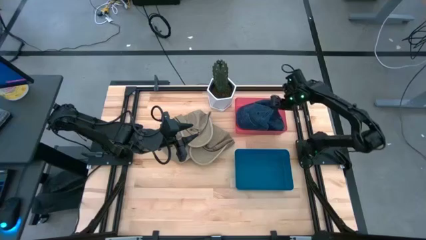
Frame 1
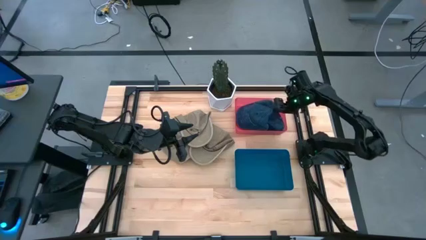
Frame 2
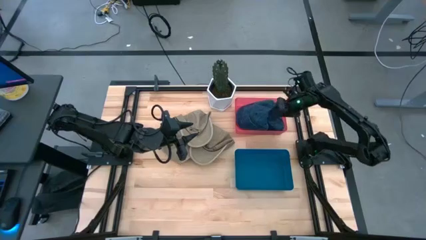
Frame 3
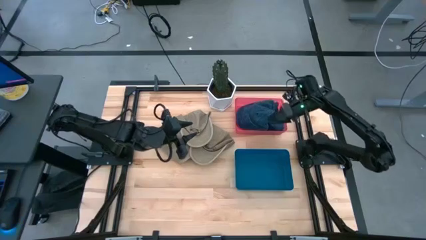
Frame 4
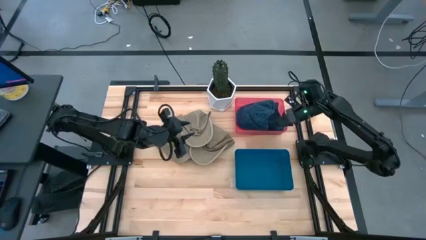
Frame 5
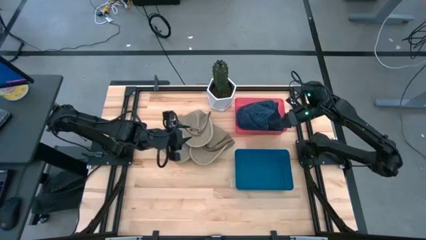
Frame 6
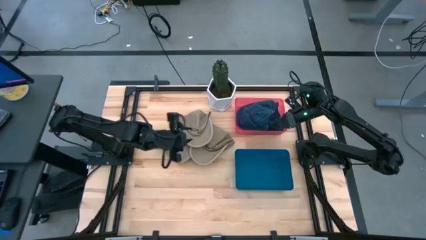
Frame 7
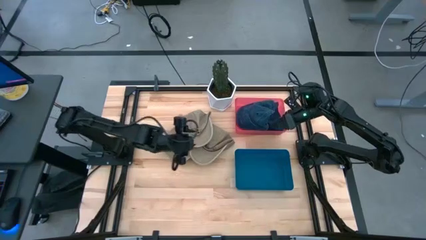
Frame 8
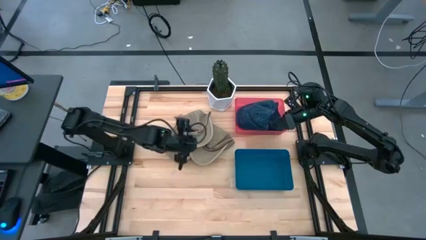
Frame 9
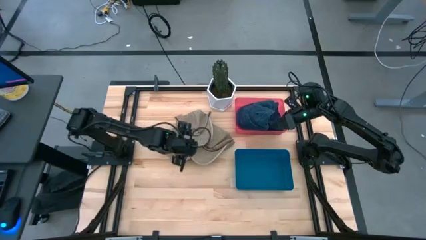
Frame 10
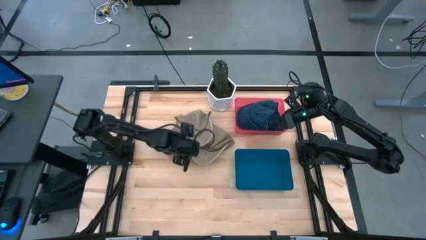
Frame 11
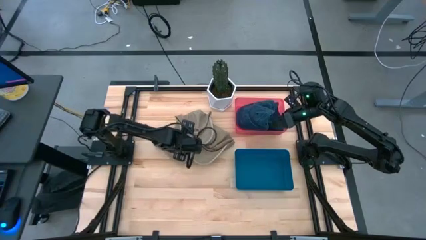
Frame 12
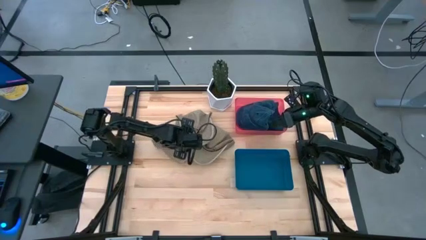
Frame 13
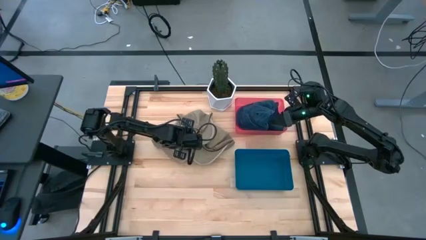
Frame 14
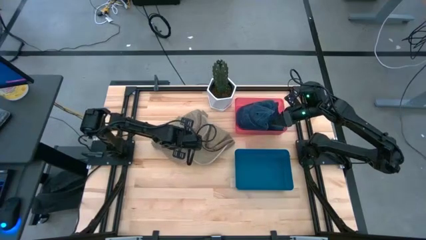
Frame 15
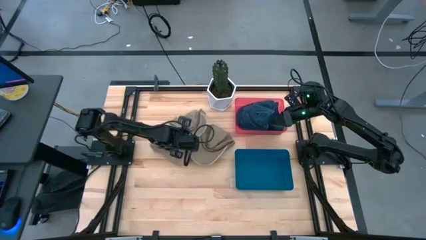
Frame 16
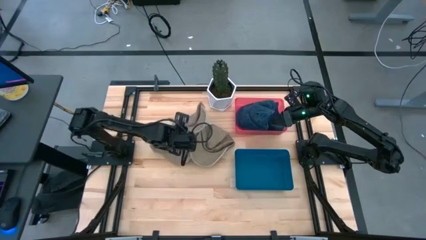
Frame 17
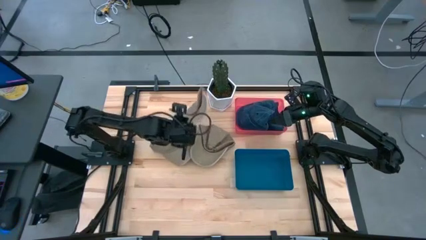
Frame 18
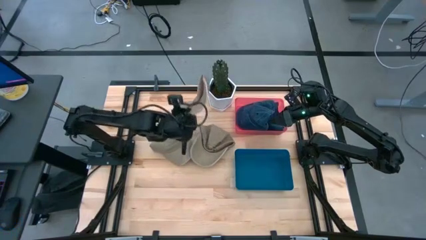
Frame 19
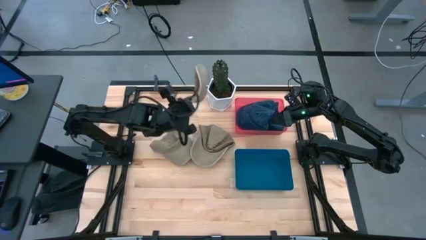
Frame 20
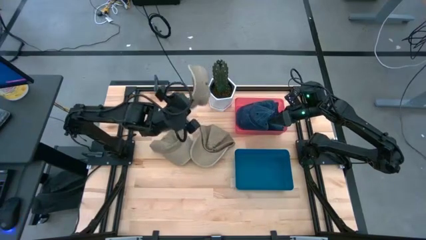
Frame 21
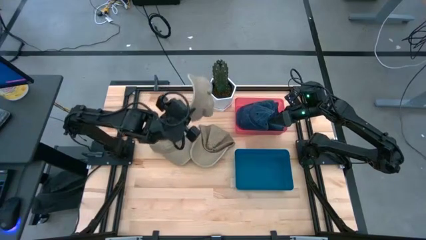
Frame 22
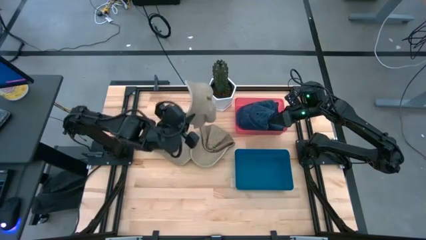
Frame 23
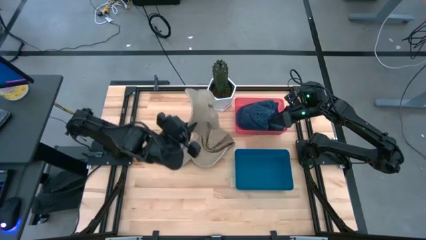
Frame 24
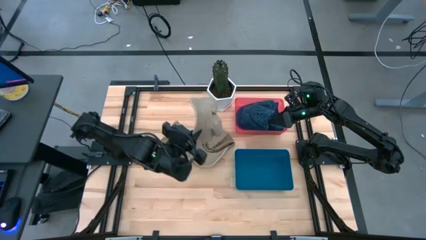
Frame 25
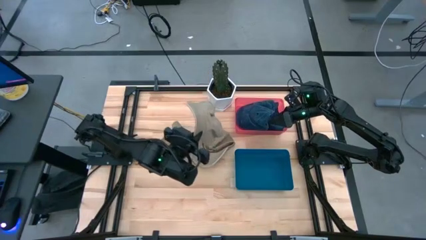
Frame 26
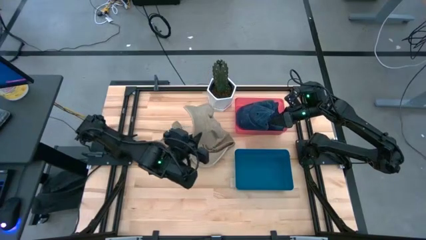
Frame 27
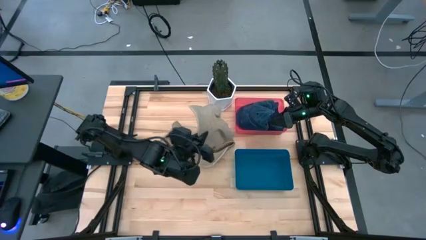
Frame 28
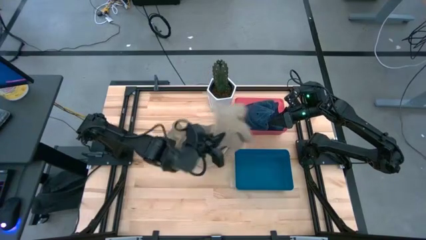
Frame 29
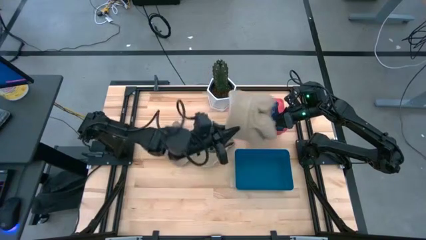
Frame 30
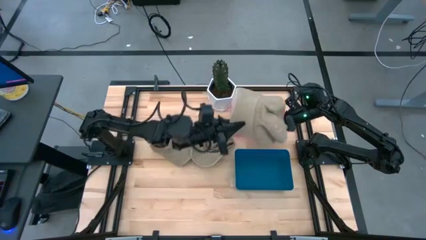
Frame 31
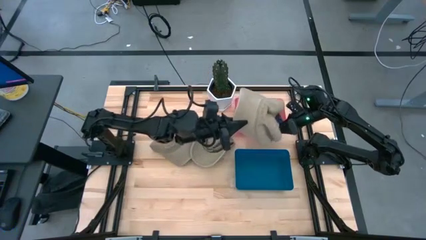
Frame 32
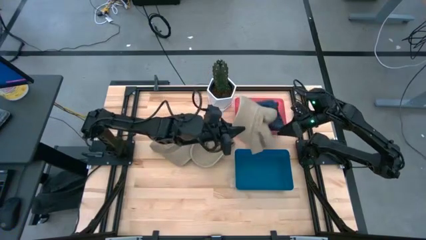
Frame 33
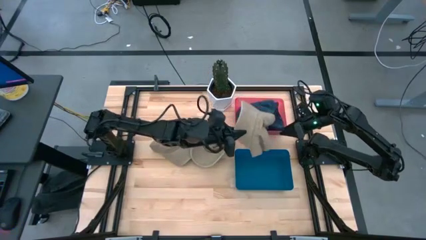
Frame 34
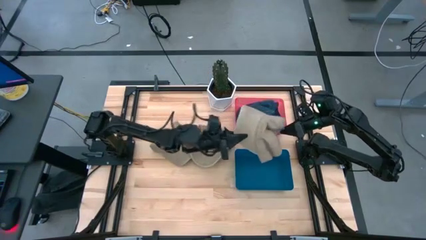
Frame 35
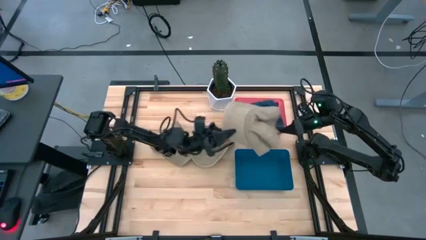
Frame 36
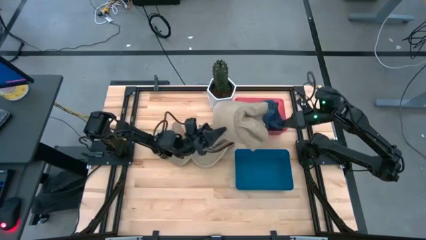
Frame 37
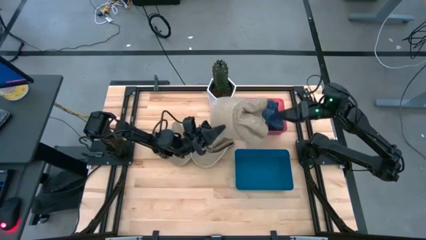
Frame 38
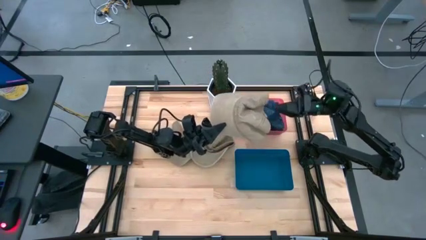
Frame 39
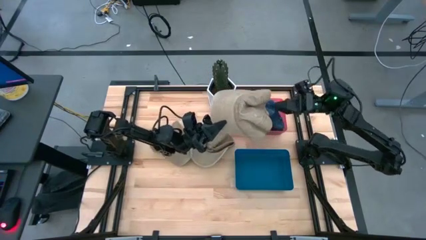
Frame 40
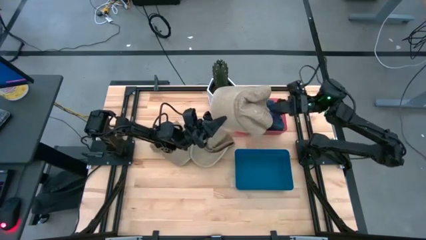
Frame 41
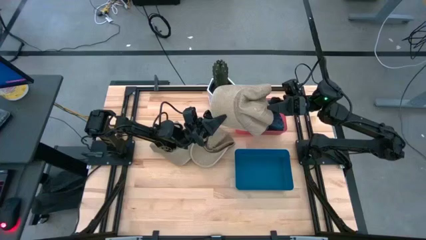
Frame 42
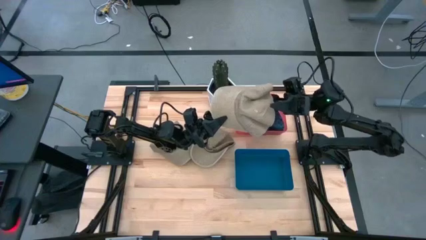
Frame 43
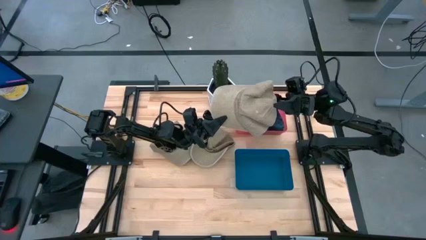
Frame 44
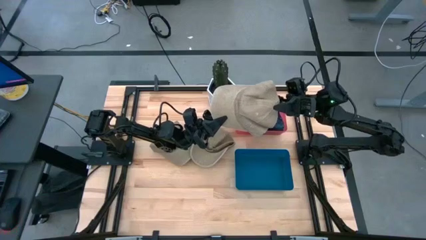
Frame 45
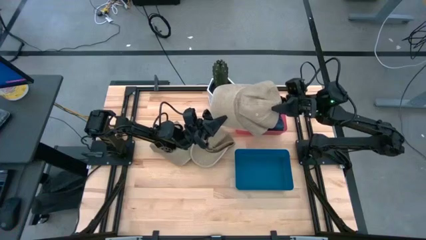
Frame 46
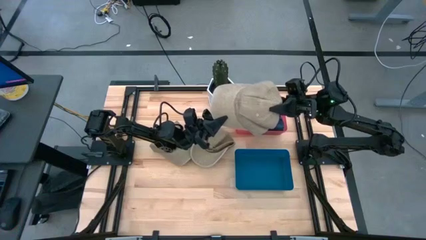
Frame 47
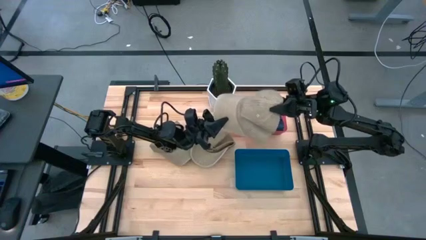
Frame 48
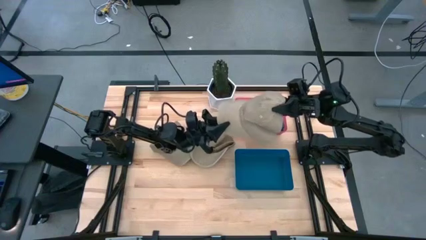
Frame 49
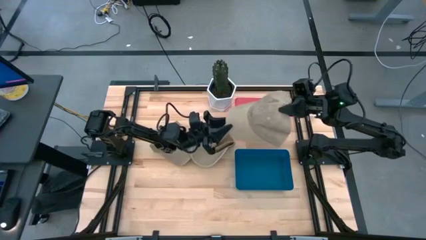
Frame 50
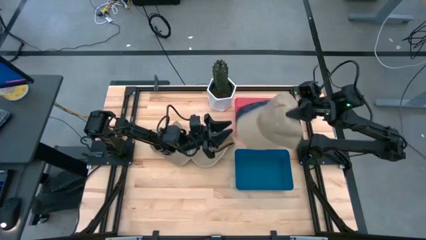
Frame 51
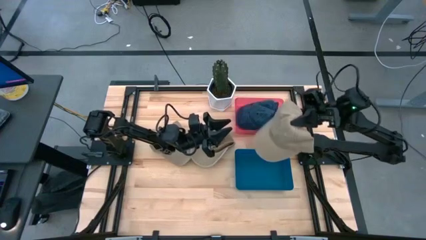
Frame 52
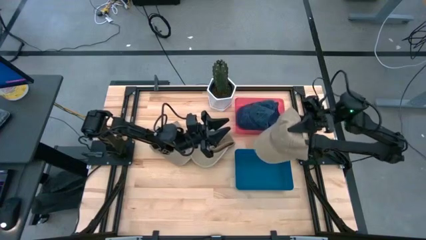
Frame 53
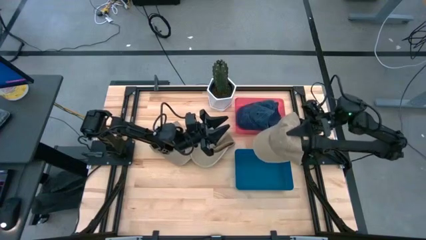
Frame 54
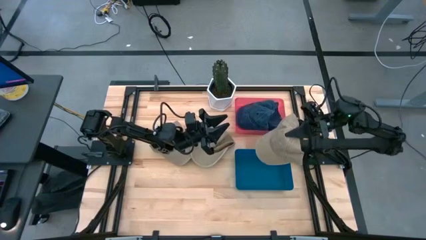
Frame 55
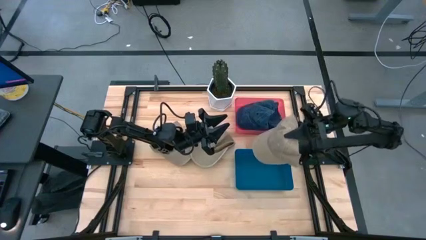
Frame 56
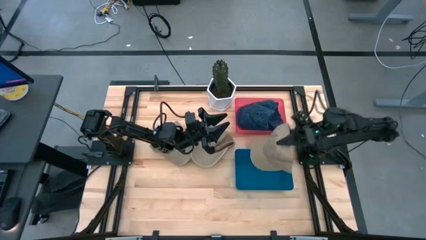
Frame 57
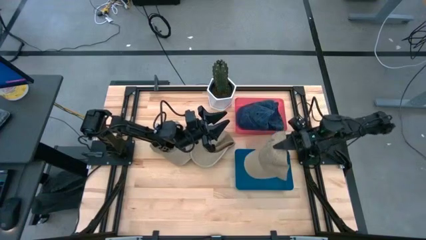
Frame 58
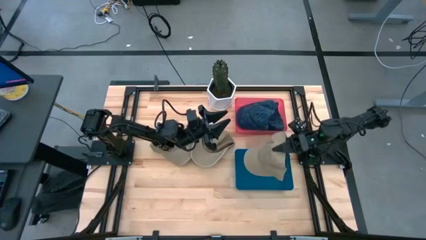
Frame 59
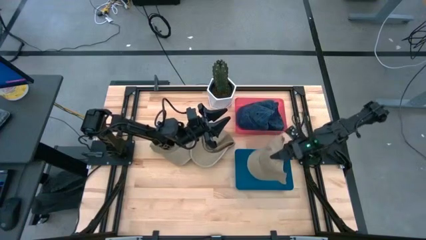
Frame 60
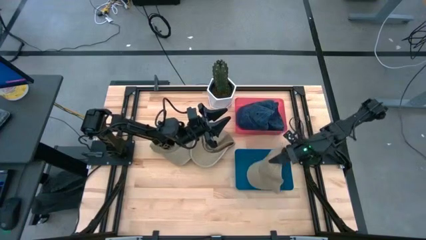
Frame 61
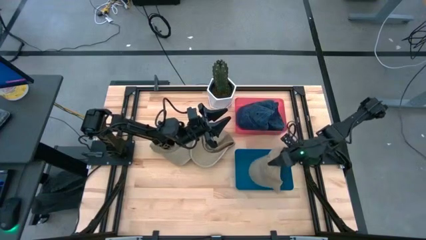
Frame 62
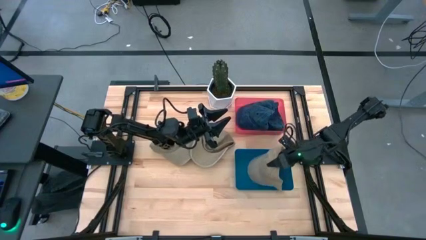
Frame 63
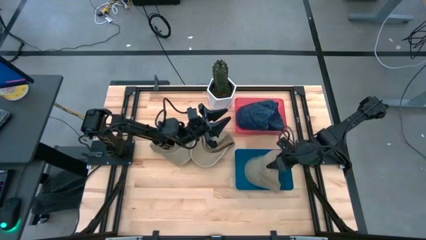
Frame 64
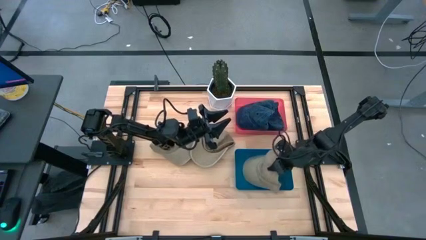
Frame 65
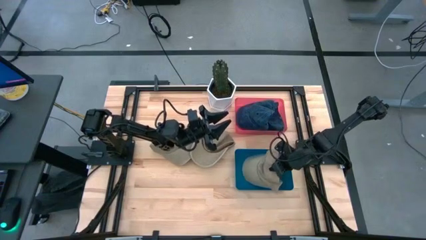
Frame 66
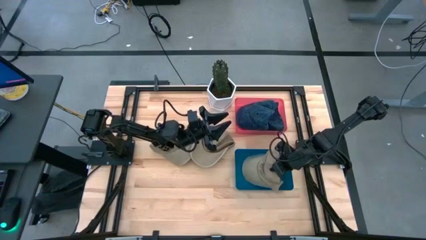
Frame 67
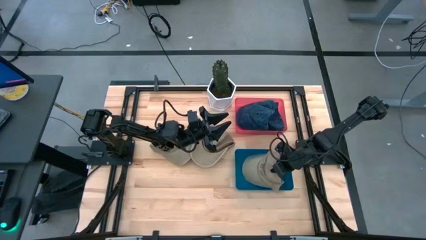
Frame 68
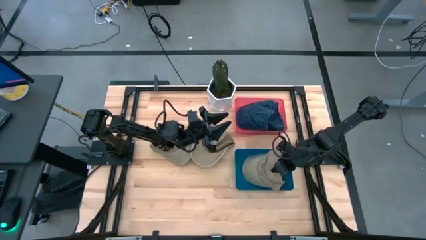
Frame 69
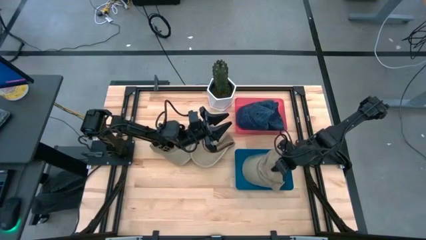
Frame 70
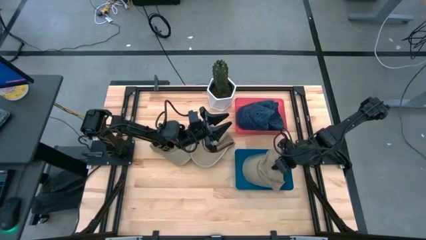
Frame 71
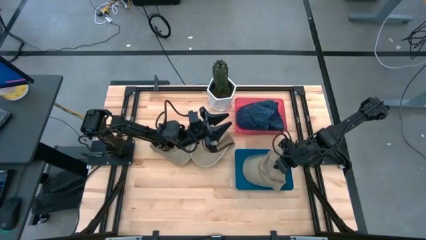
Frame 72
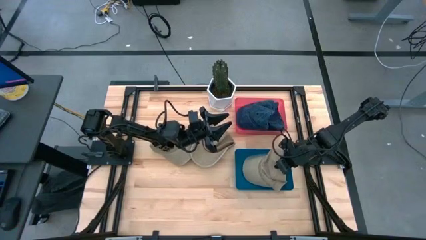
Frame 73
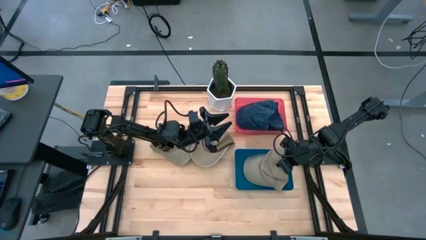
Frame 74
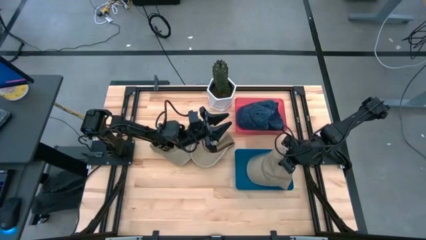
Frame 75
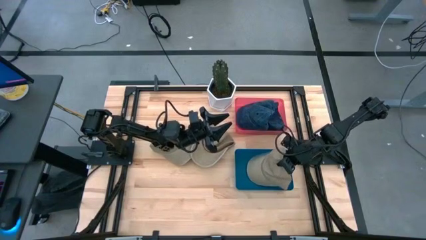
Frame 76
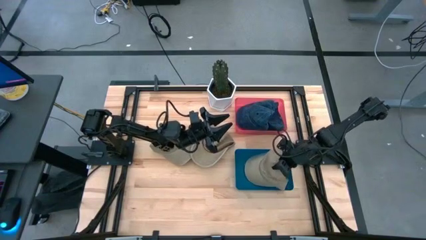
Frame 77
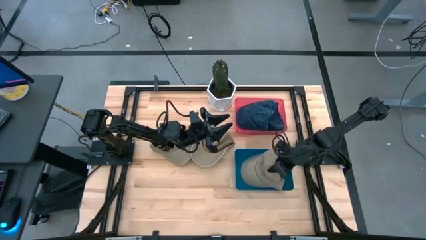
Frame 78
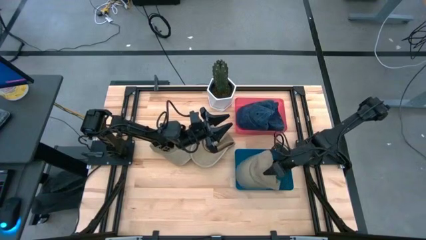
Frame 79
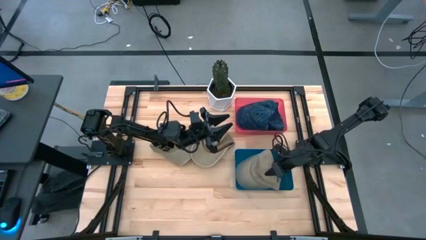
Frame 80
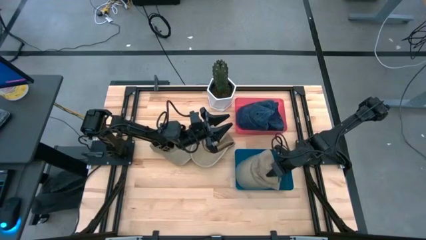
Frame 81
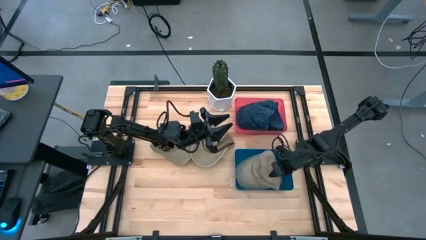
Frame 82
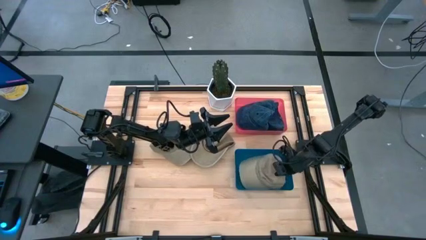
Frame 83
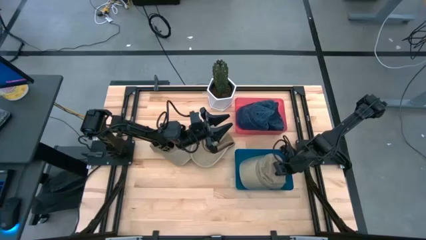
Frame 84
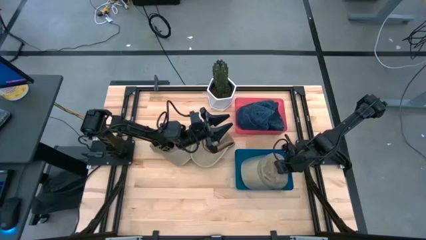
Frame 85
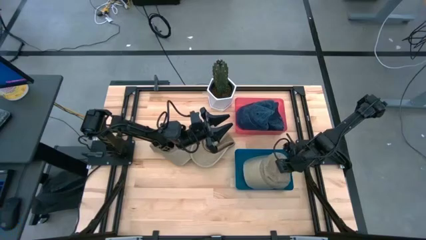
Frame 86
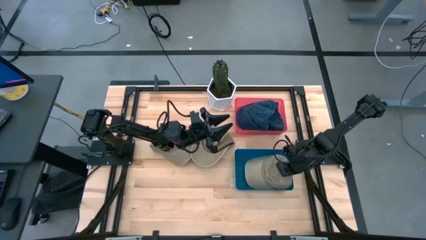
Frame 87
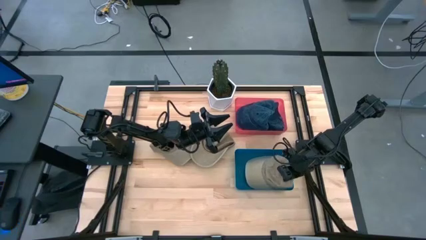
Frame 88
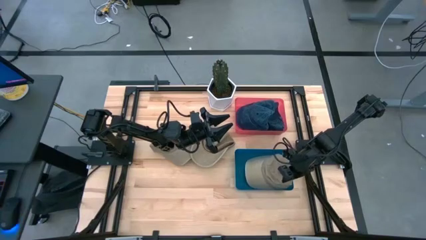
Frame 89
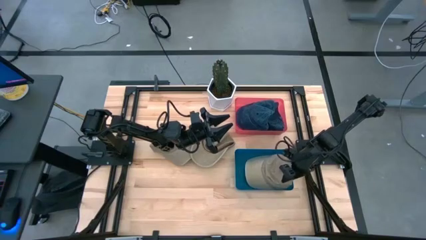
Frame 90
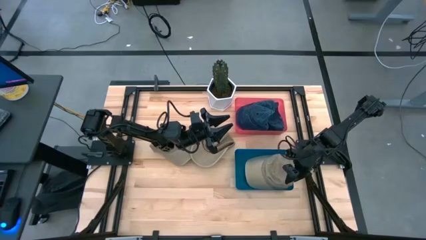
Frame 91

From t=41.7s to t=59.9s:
Task: Pick & Place hat
Put the center brown cap into the blue bin
